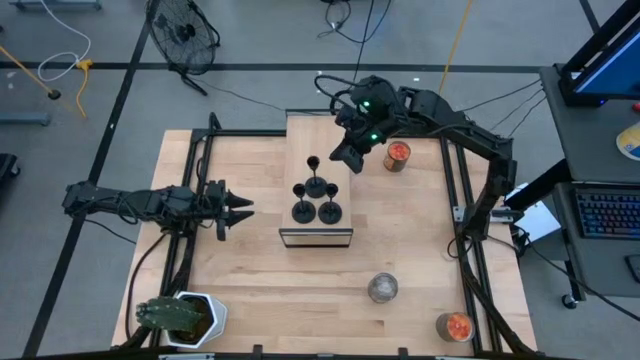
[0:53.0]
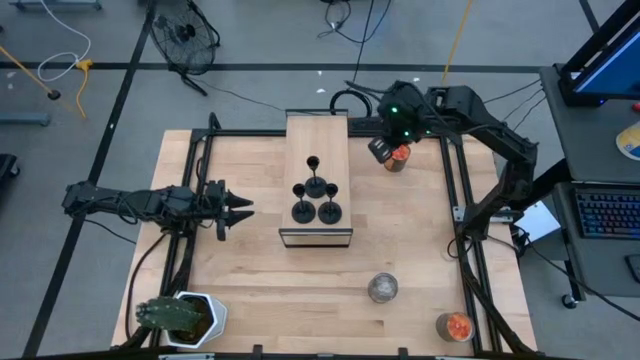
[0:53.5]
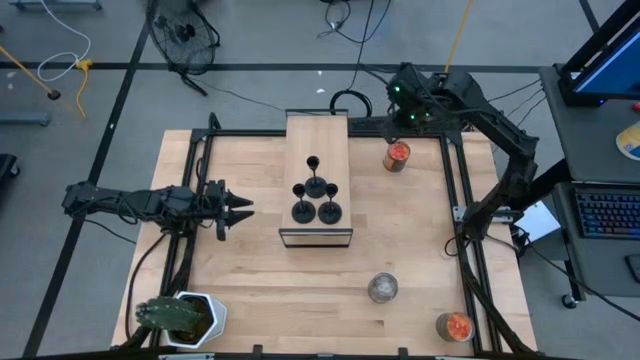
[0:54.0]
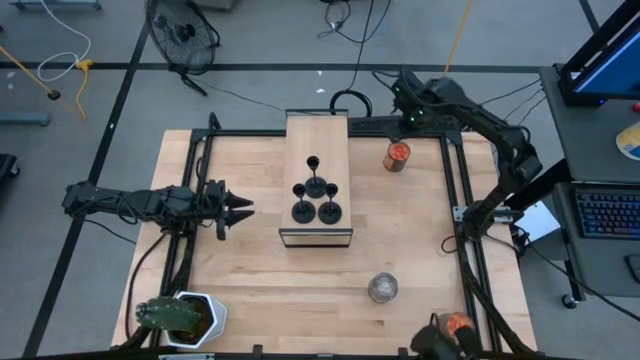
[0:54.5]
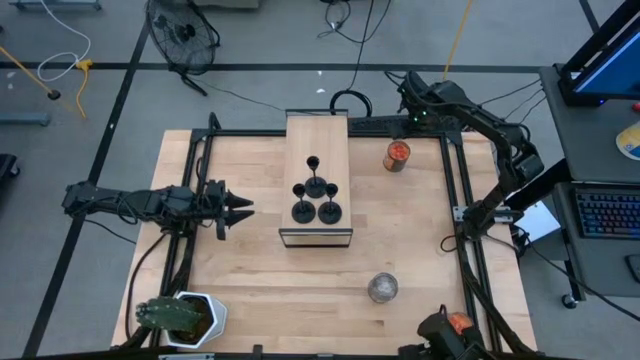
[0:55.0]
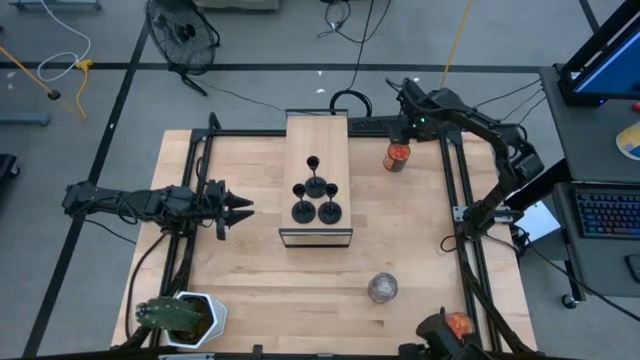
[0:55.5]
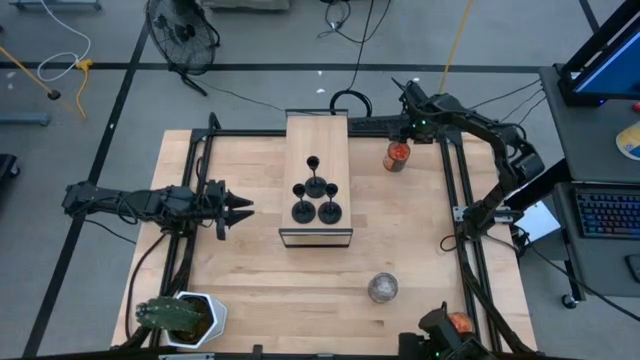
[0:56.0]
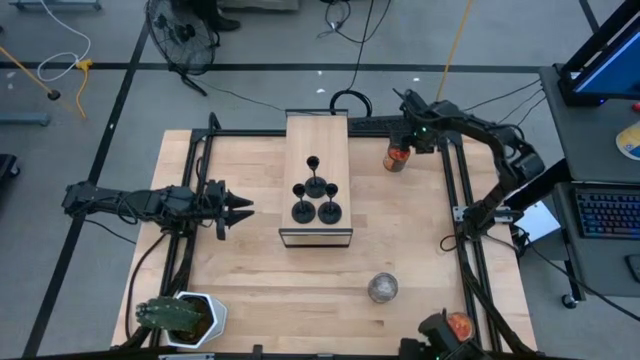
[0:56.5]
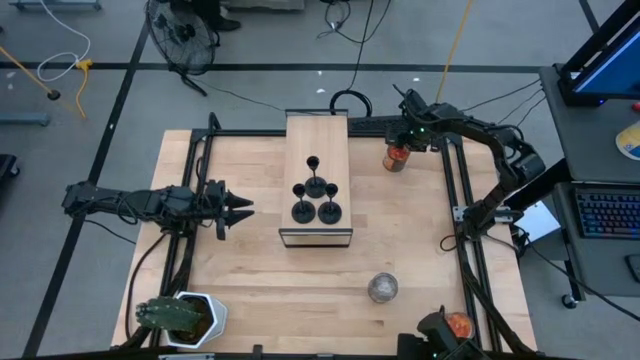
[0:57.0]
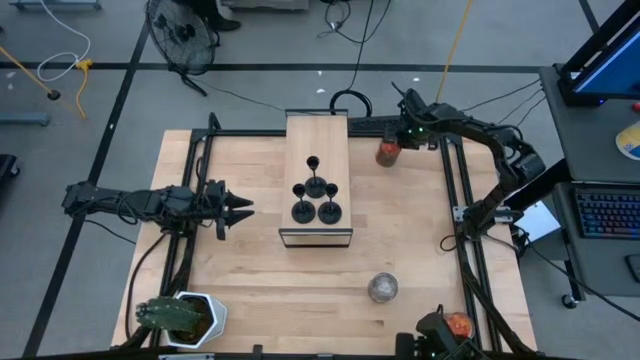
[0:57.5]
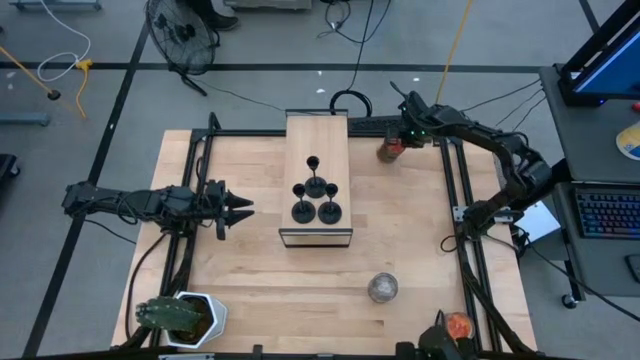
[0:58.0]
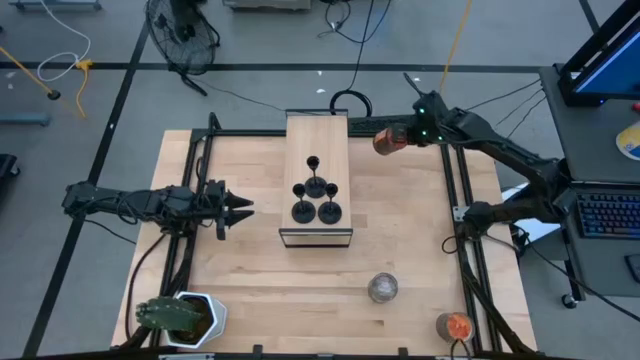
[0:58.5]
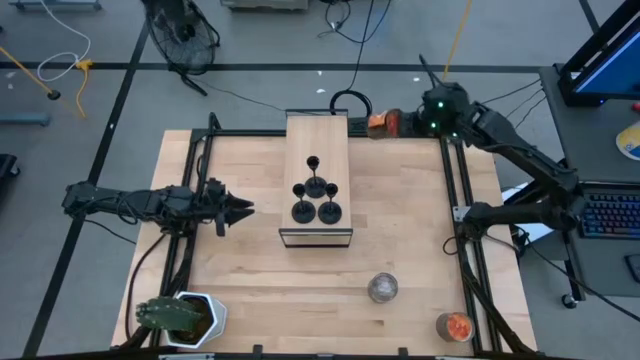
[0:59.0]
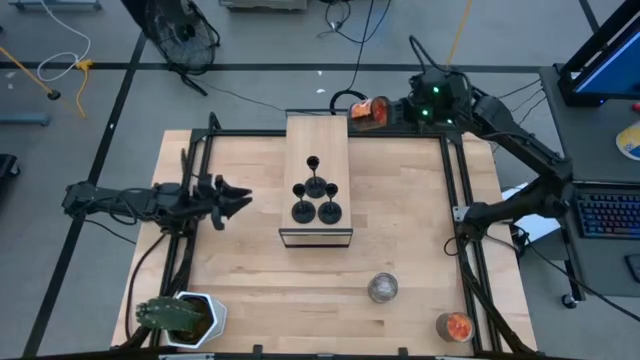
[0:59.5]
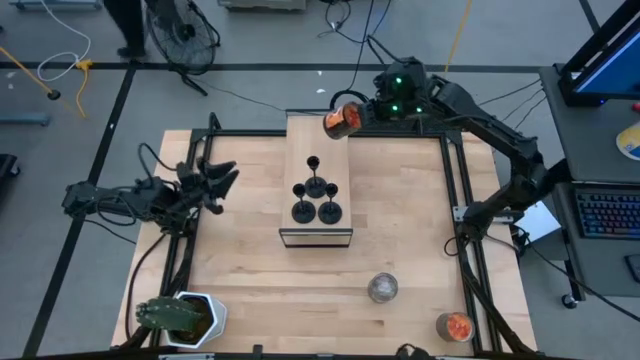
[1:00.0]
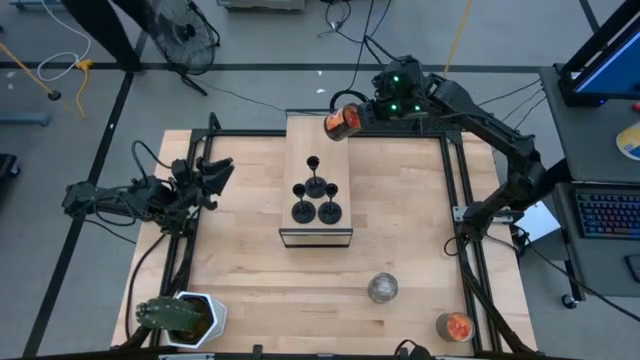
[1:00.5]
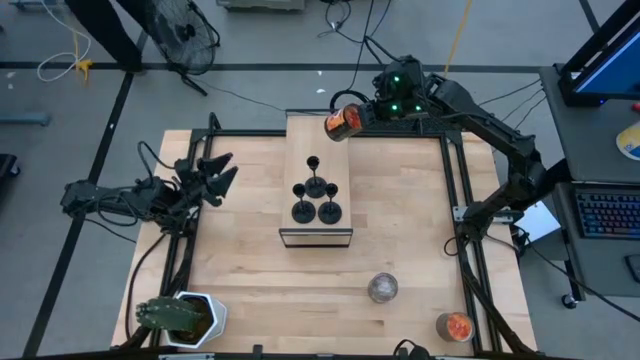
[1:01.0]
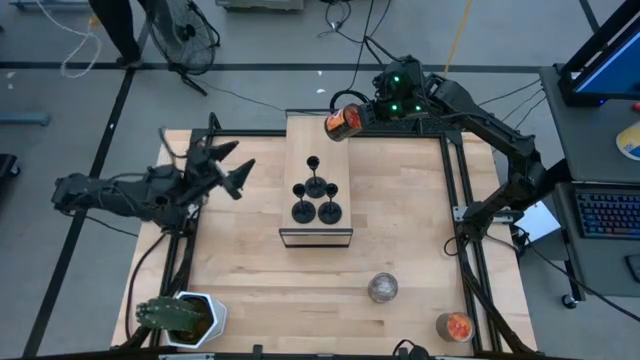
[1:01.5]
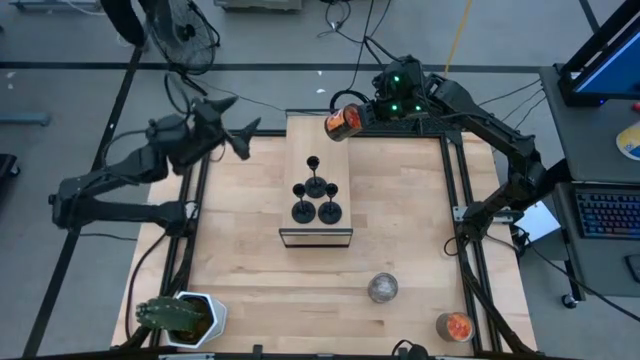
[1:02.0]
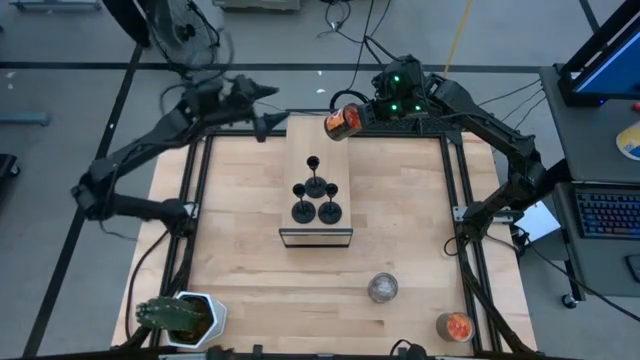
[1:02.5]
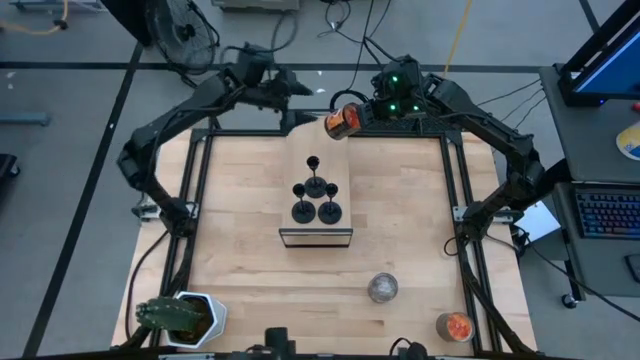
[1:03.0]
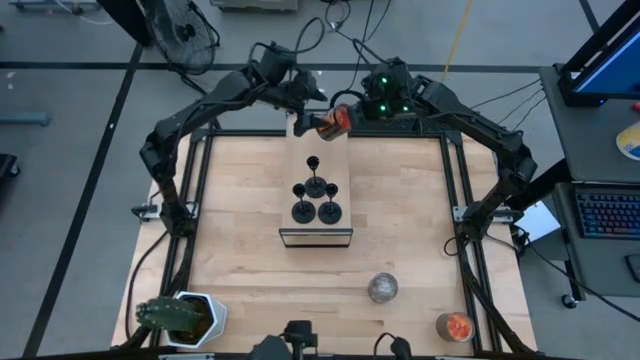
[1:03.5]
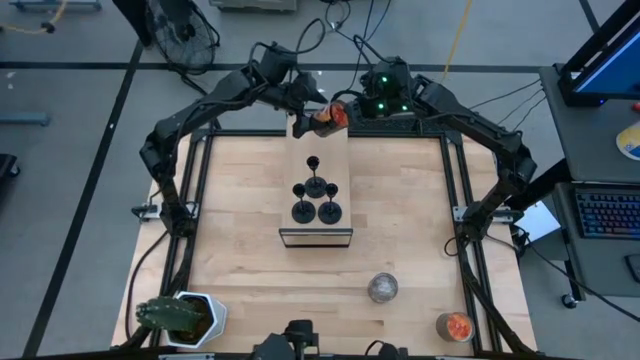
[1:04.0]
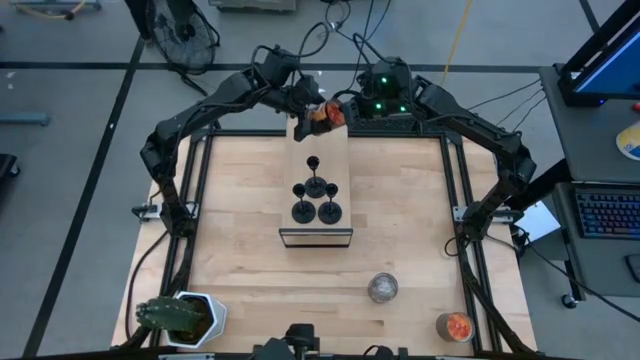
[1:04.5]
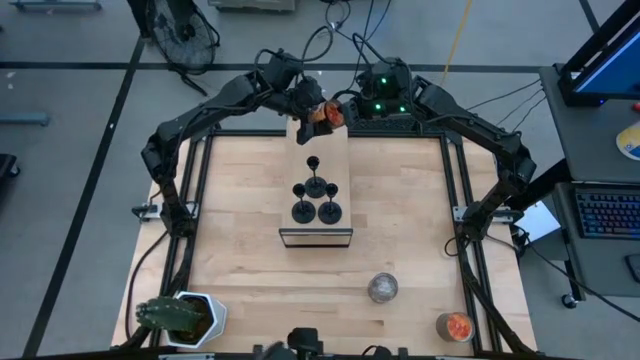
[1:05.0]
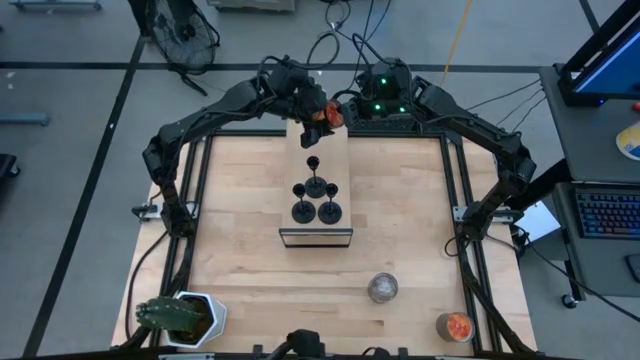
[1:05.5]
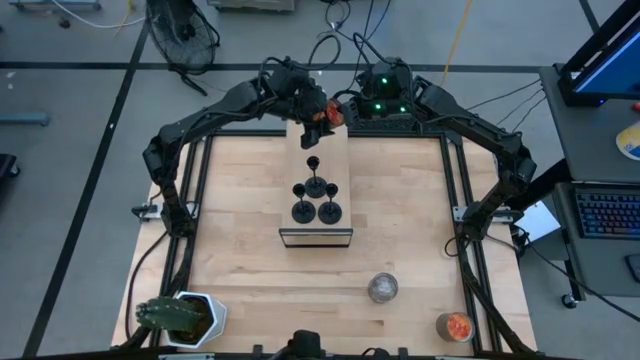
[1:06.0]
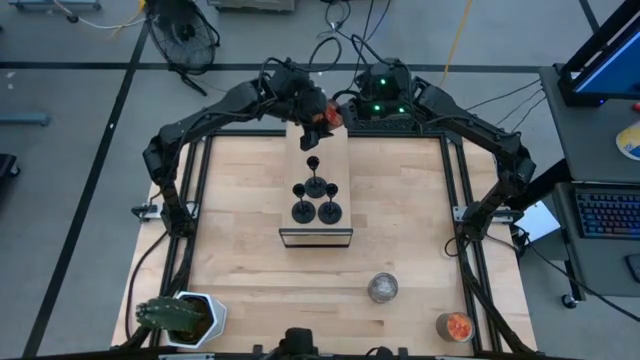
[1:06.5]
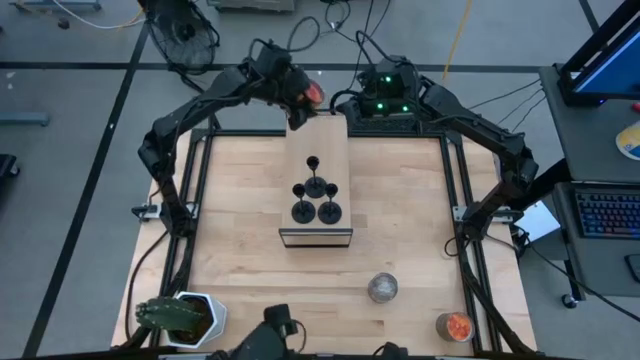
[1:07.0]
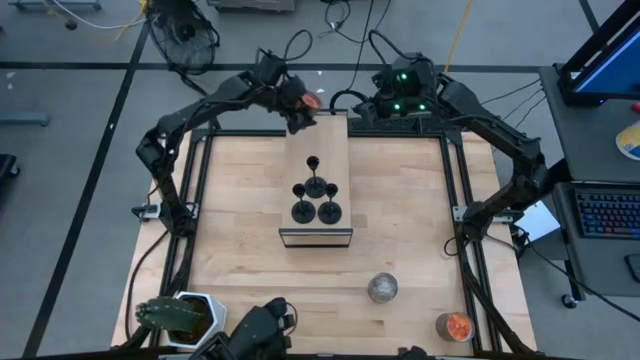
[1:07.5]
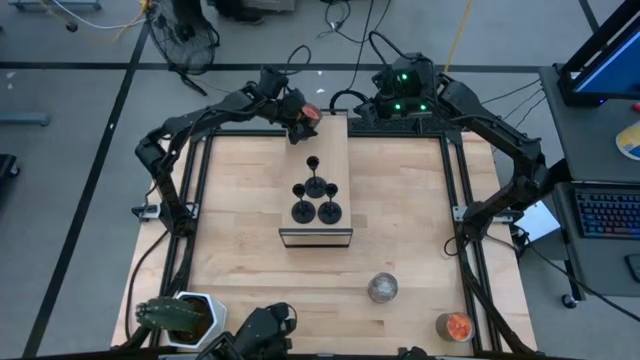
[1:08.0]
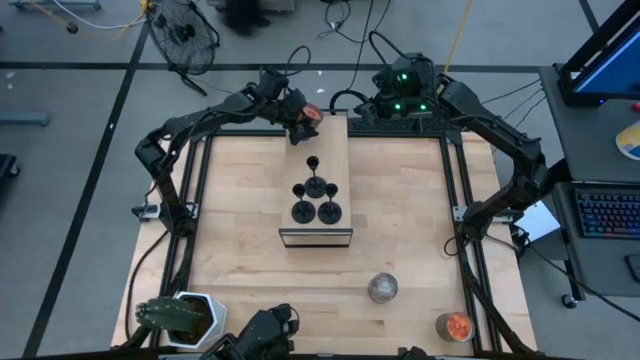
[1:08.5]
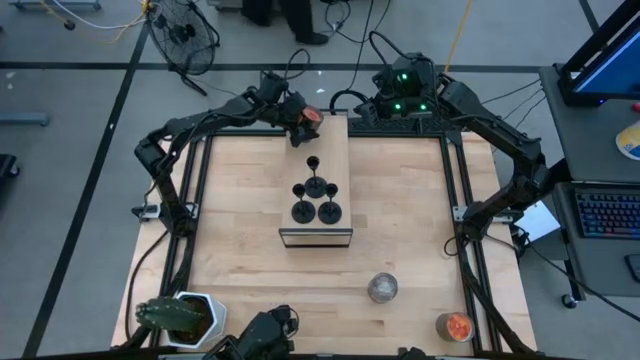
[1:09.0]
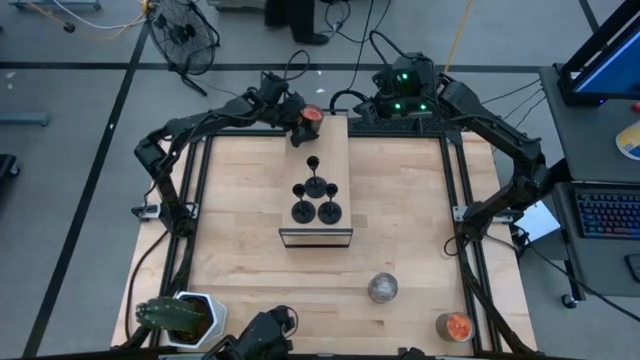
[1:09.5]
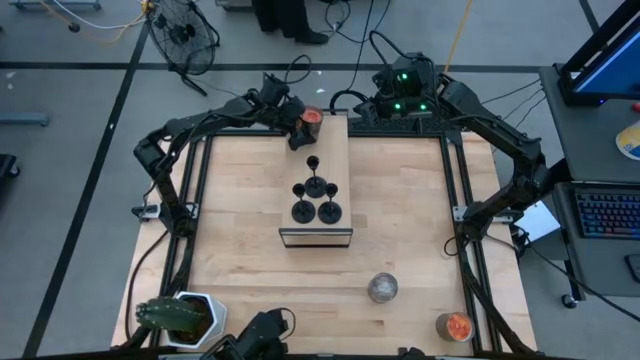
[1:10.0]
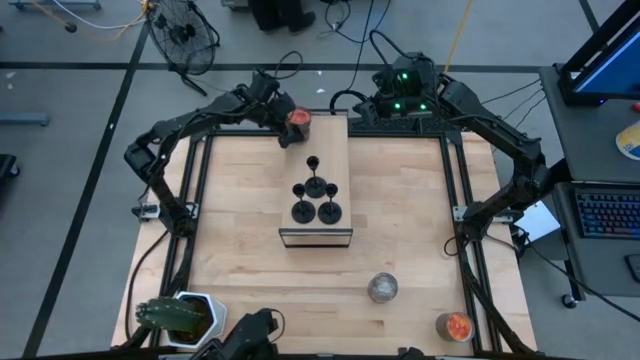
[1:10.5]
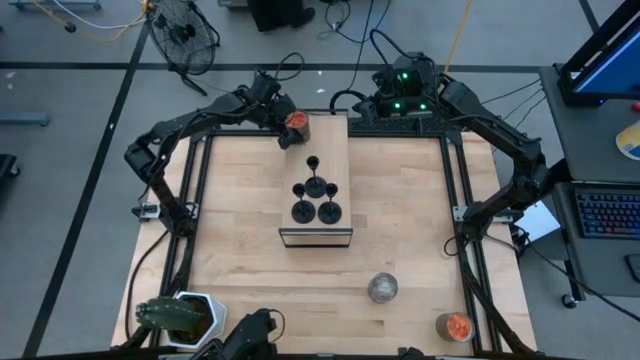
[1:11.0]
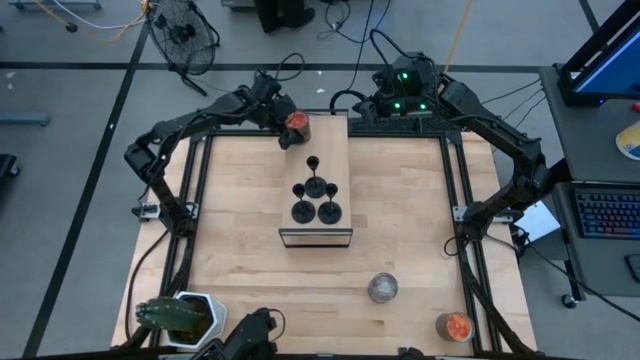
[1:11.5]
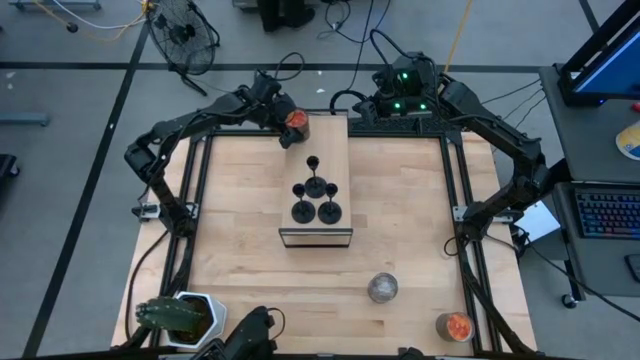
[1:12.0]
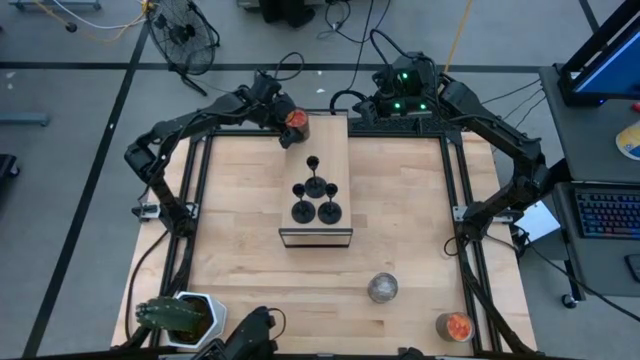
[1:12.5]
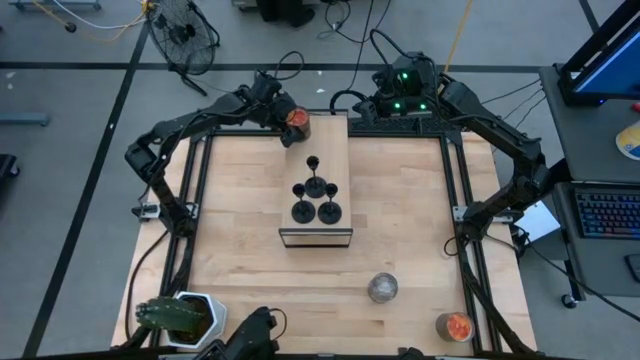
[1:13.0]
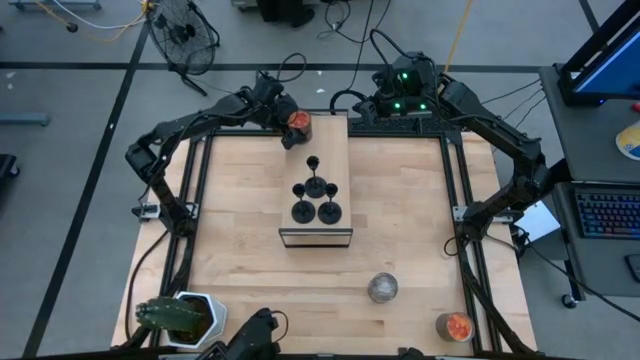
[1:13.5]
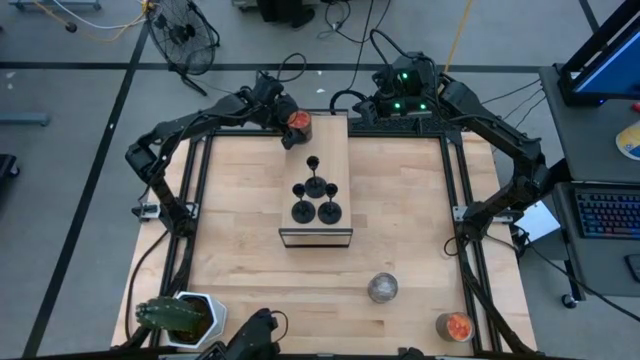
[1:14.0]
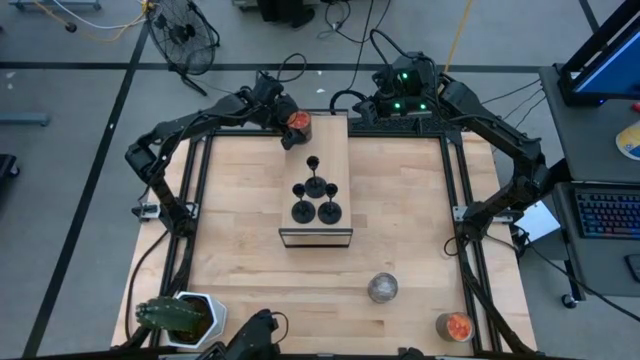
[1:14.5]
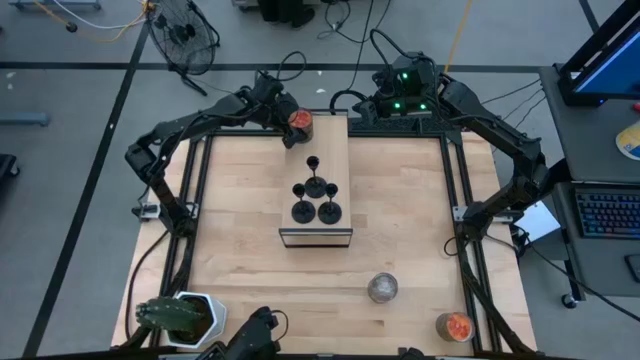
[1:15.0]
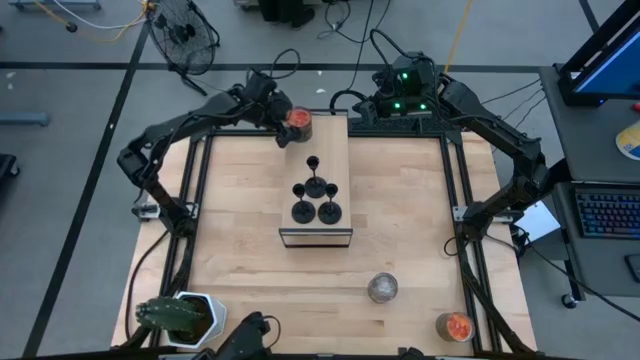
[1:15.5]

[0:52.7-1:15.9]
Task: Pick & Place candle stick holders
Put the top orange scented candle on the shelf
